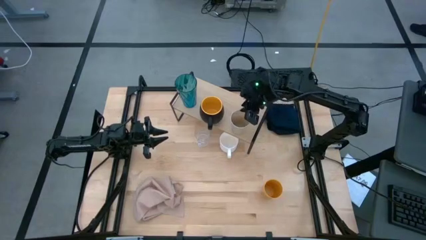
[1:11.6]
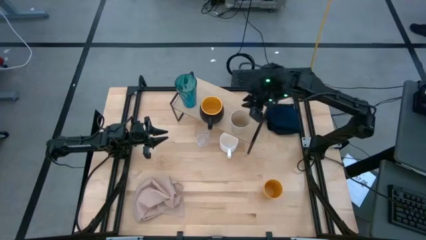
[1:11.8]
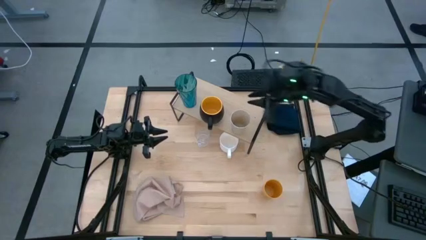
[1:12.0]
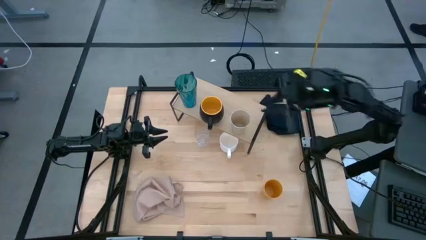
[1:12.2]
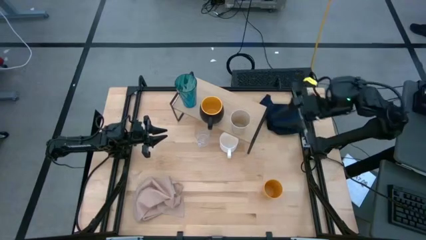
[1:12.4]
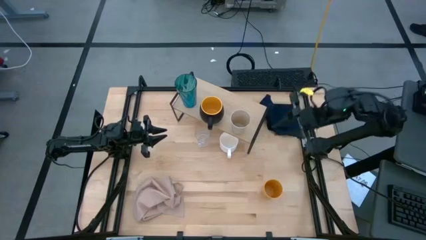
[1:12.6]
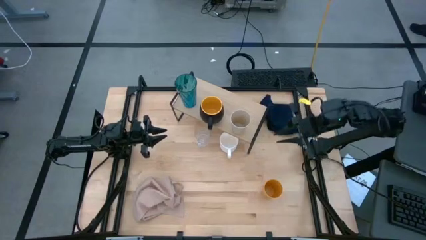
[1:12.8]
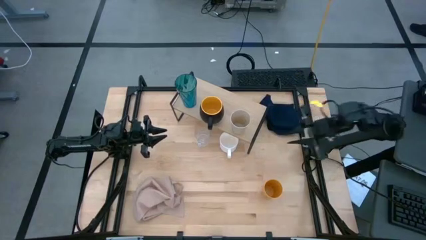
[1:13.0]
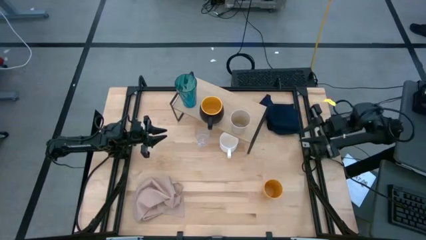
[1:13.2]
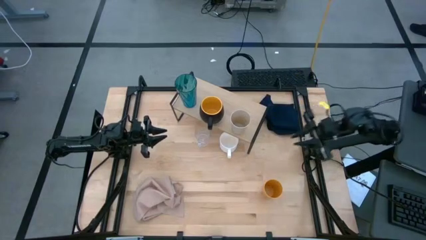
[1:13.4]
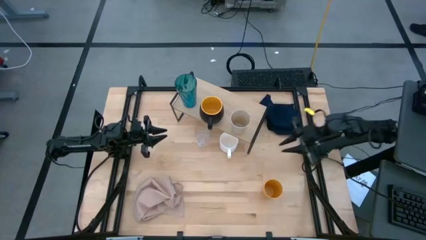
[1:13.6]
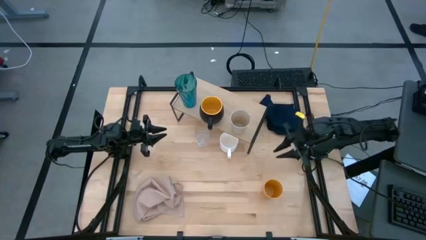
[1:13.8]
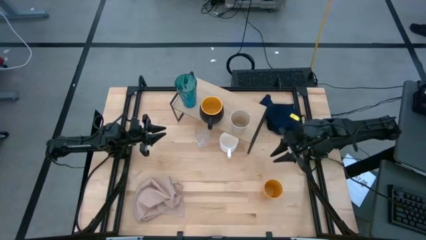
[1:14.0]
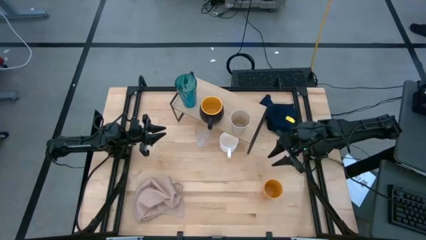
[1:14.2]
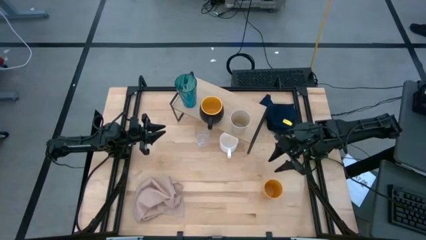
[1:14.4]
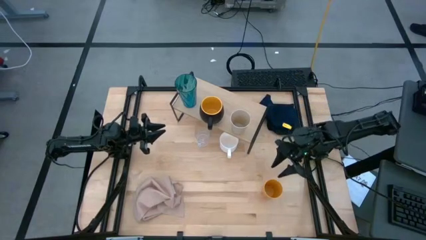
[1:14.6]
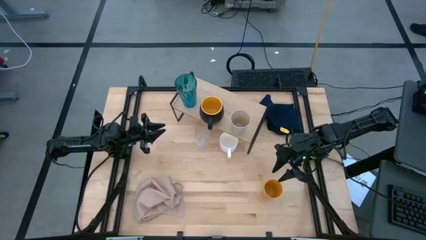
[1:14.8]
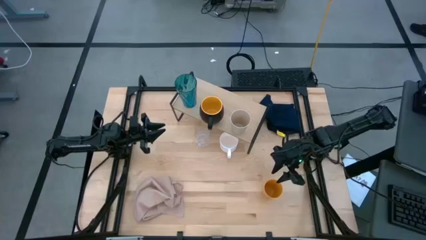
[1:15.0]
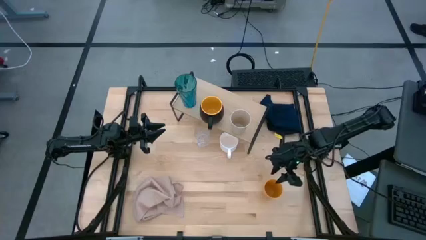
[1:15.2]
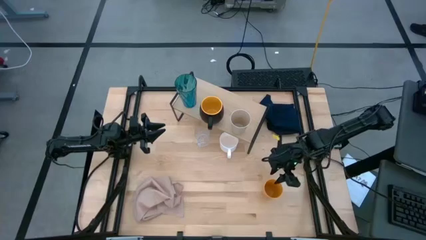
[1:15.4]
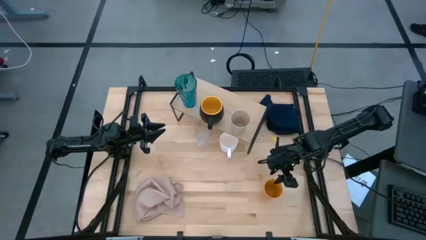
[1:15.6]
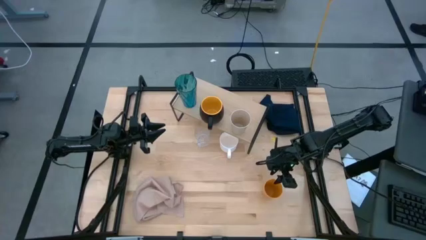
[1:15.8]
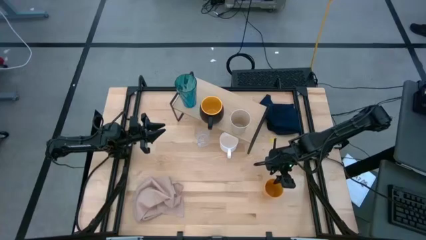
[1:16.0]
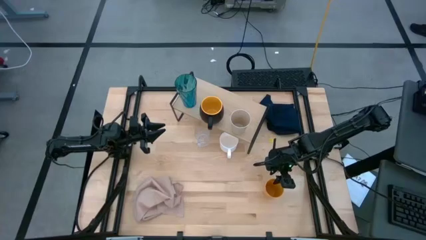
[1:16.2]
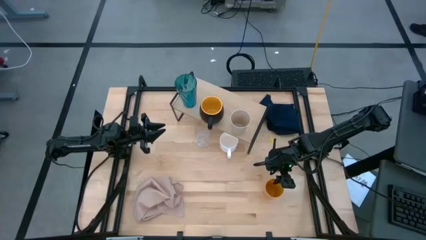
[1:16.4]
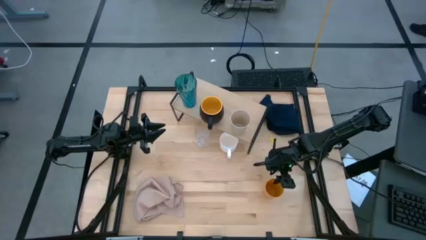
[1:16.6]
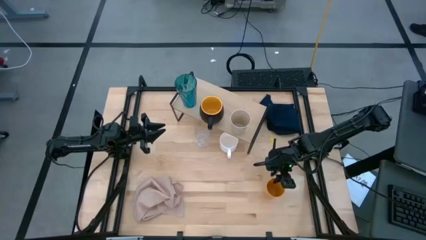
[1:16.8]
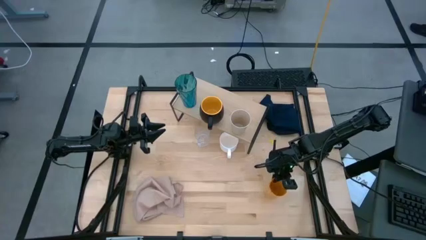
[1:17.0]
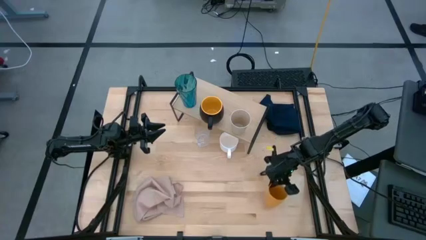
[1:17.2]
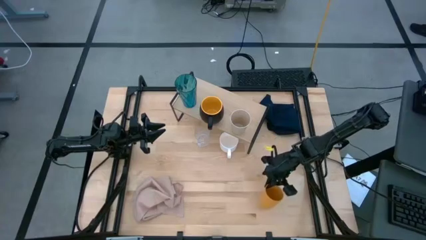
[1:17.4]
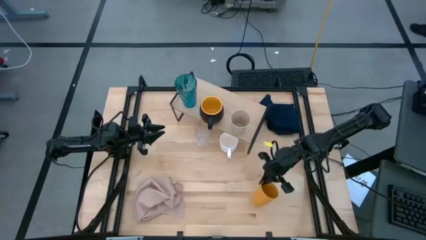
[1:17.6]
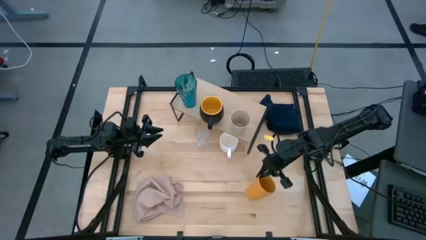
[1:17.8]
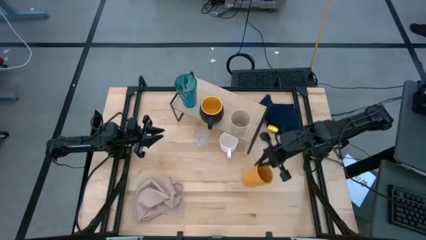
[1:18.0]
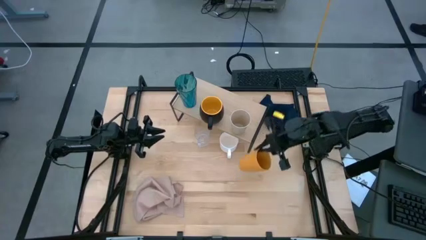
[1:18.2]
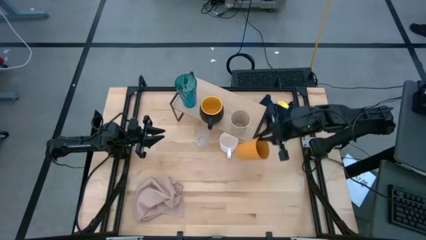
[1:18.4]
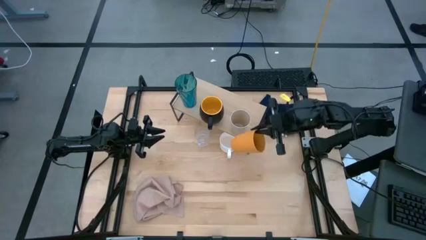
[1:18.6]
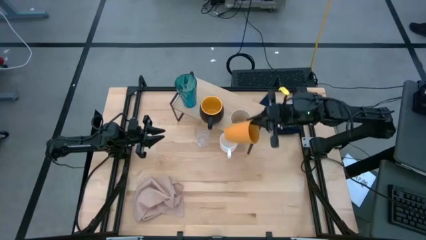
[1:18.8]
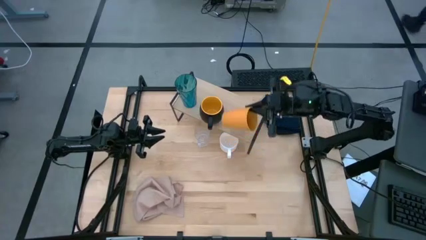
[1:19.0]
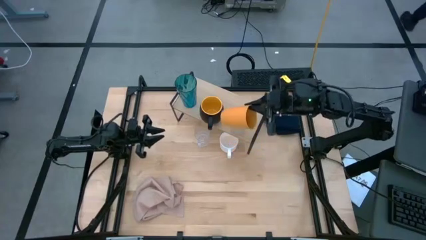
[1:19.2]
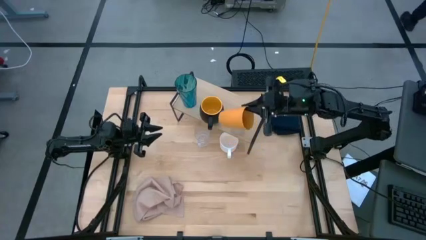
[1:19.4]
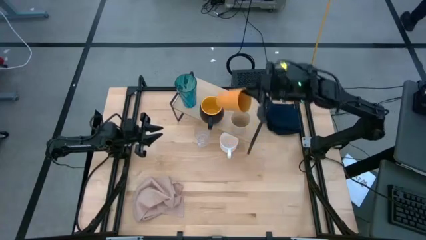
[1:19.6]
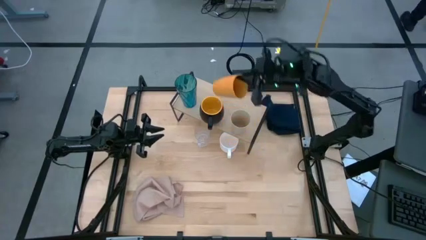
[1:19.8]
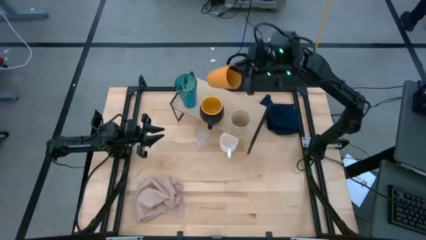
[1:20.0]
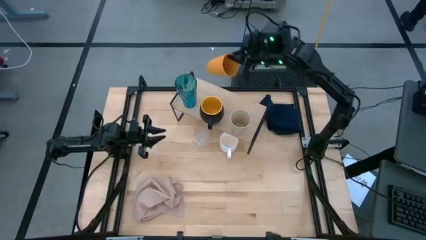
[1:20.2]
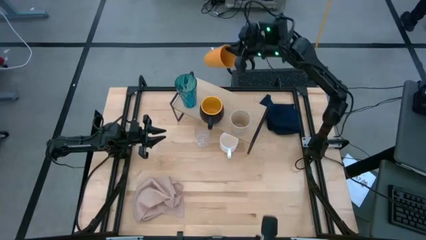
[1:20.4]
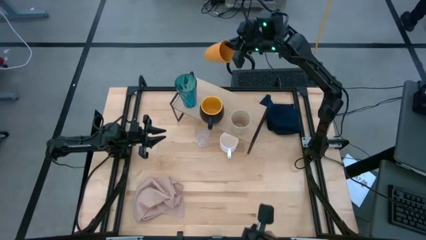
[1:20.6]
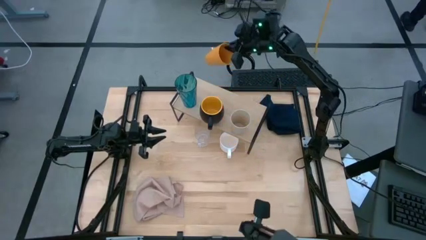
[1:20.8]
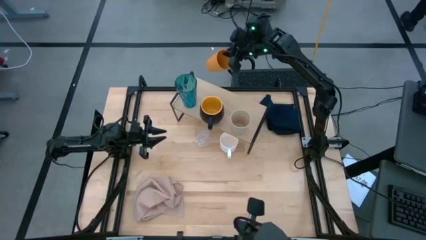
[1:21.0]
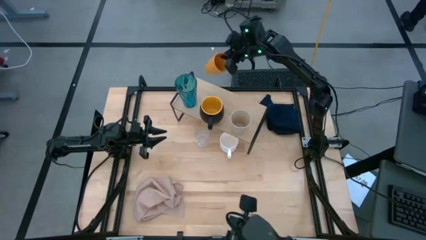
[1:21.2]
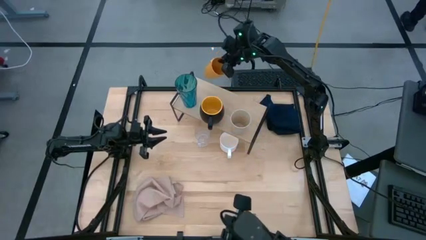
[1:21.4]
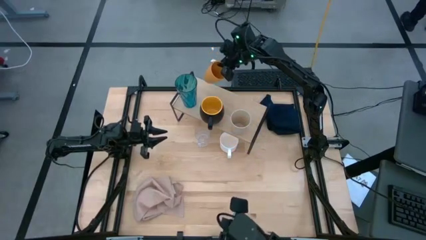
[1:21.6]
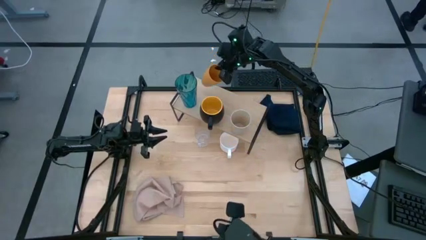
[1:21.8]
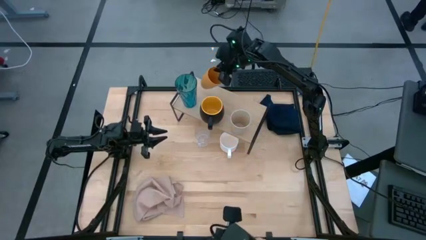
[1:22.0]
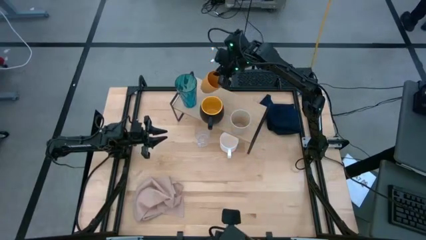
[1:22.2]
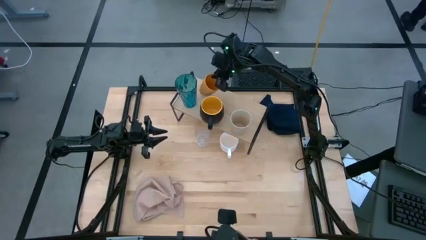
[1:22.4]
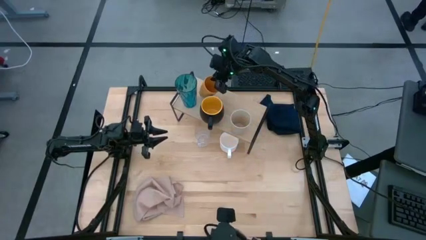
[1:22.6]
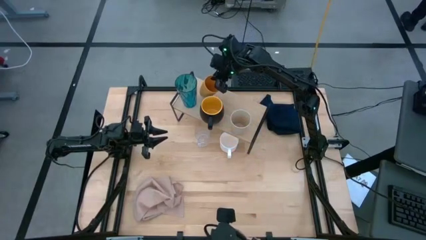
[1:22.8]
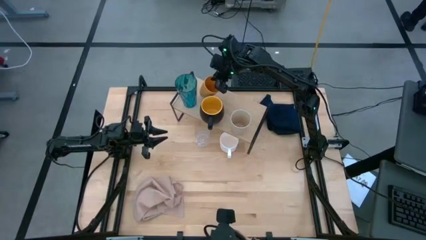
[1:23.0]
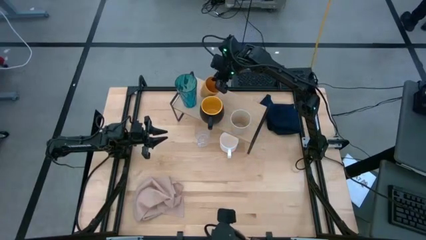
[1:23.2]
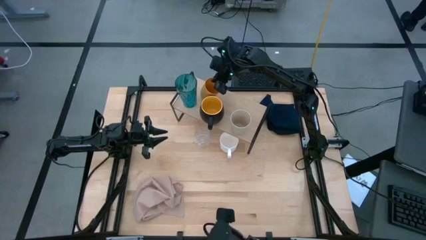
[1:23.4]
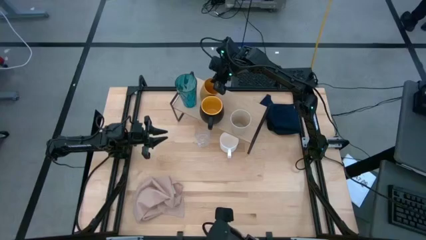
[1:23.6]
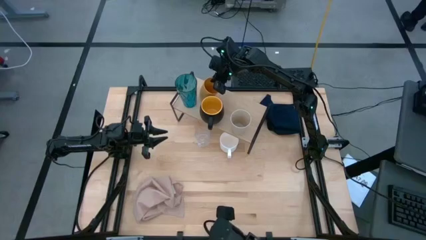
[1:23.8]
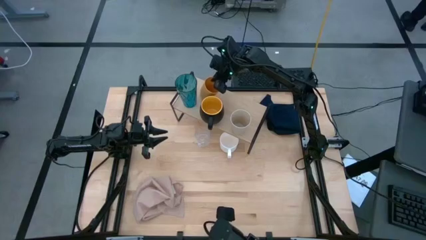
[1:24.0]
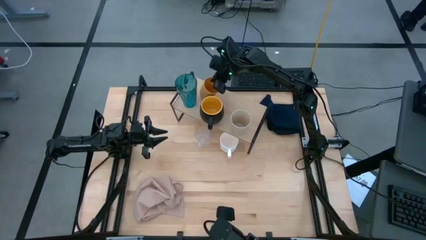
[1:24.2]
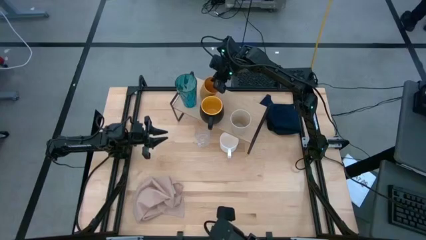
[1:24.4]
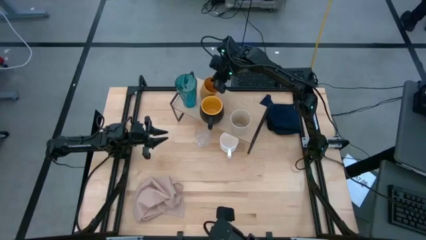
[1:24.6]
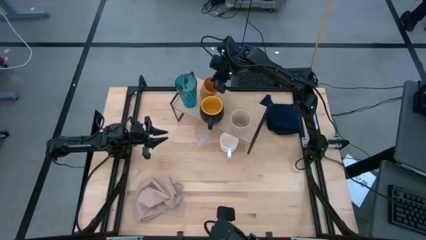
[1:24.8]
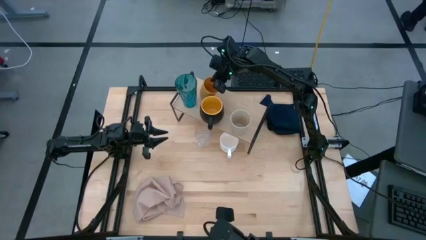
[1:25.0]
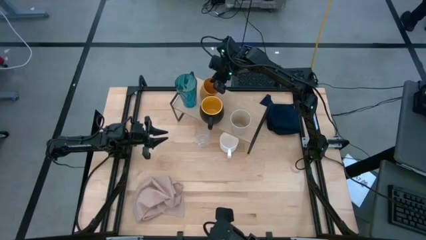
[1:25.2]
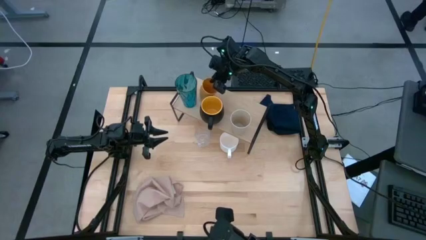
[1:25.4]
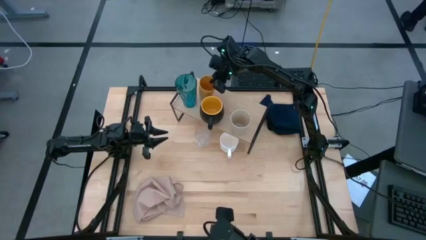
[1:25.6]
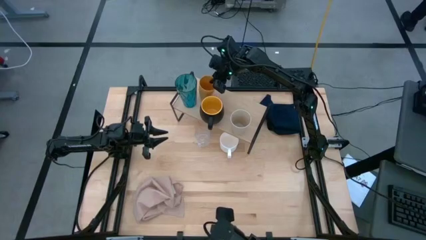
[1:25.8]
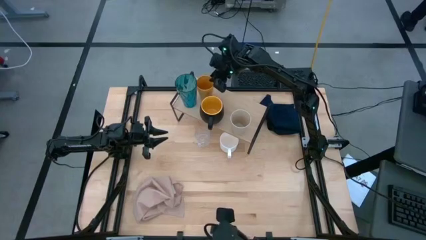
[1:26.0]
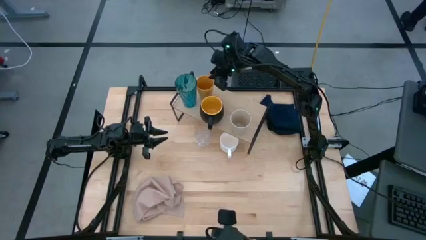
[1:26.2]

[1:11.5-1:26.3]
Task: Stack small to large cups/mugs on shelf
Put the yellow cup on the shelf
